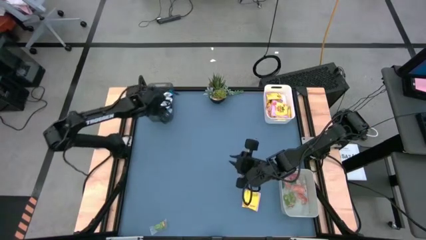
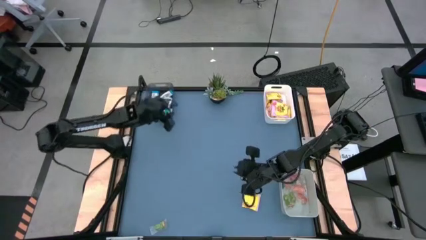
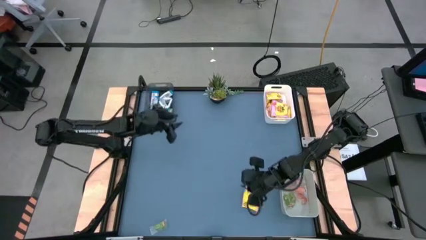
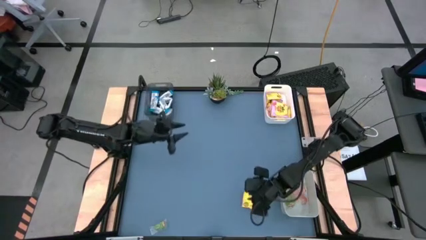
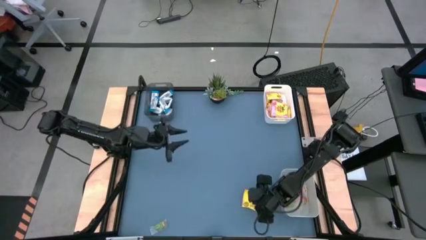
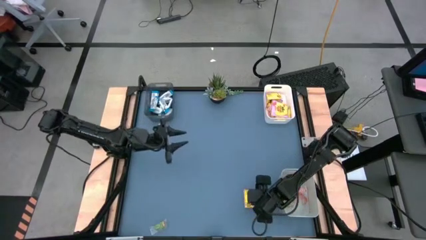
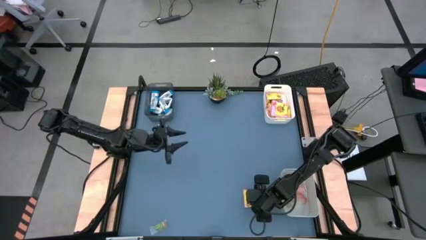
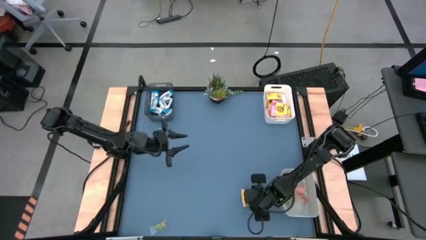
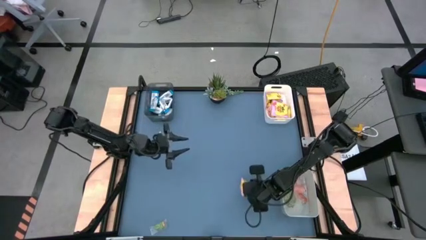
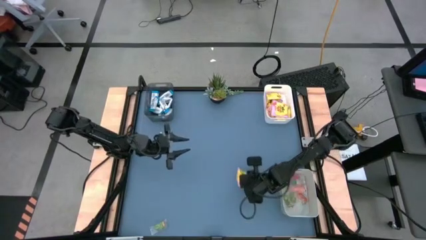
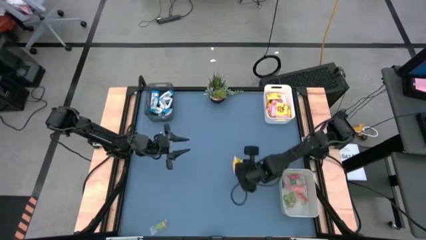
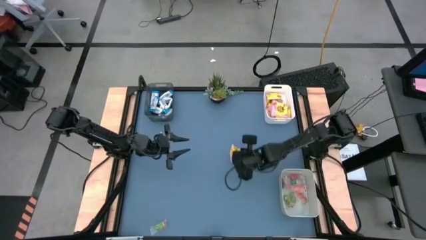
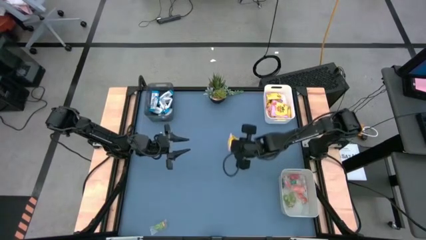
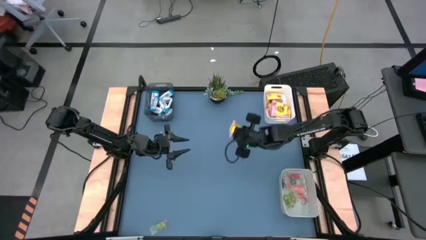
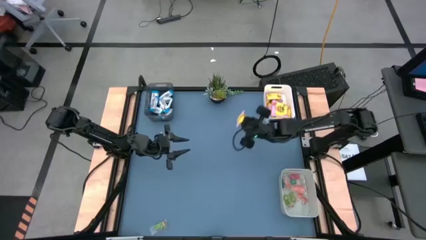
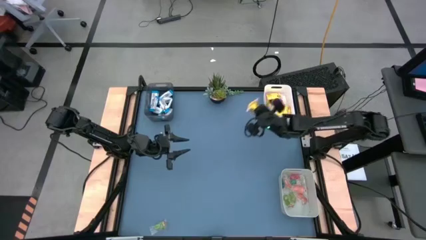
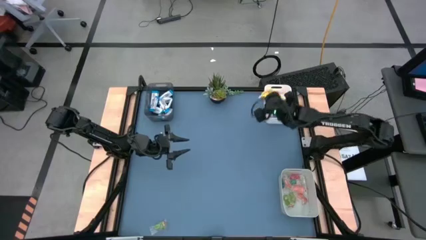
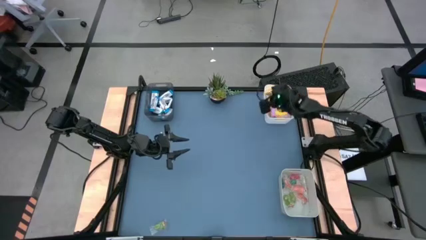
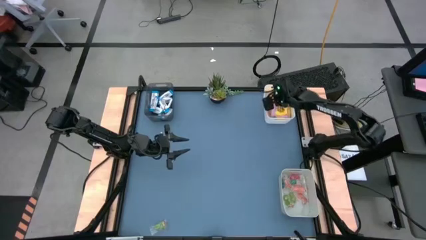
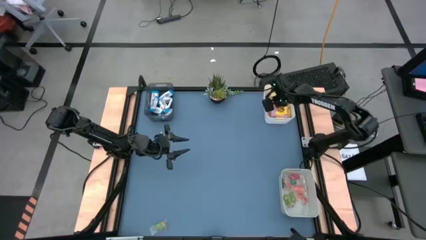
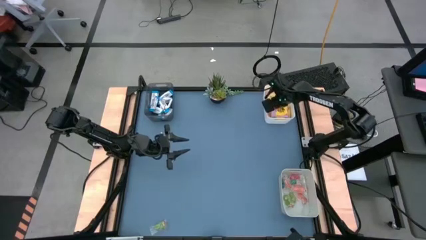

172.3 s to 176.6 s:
Task: Sort candy
Put the yellow candy pack into the white bin

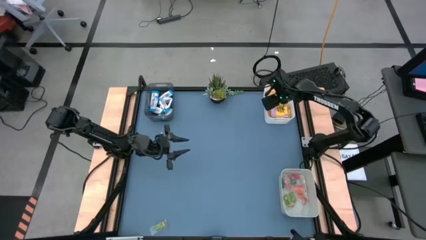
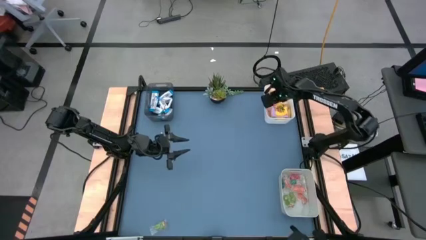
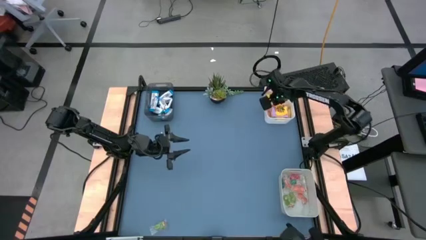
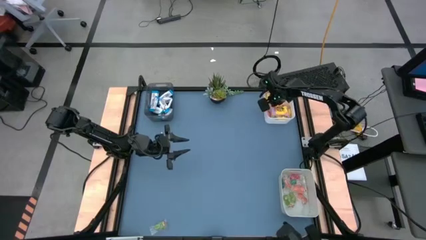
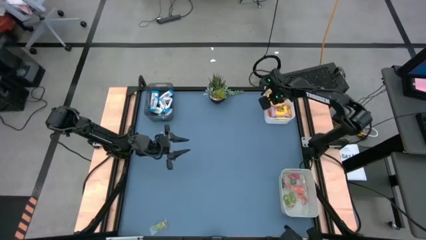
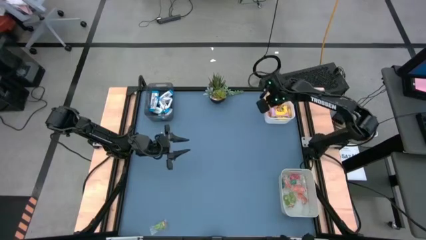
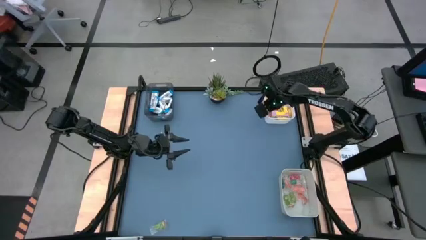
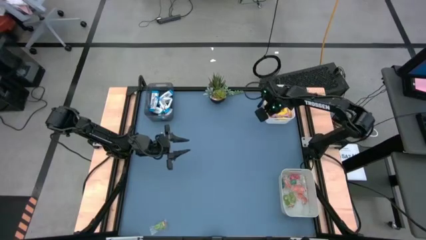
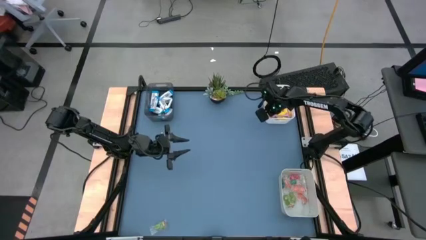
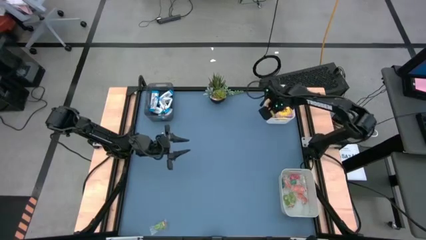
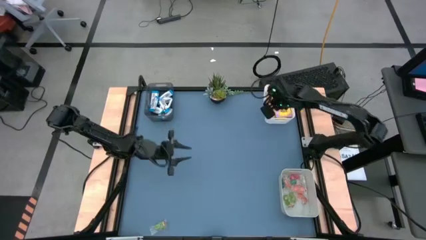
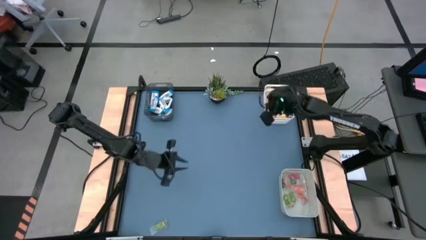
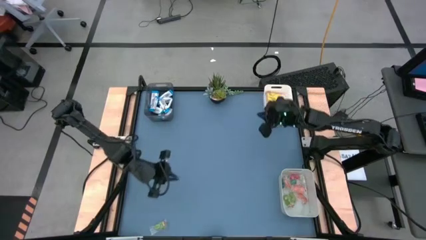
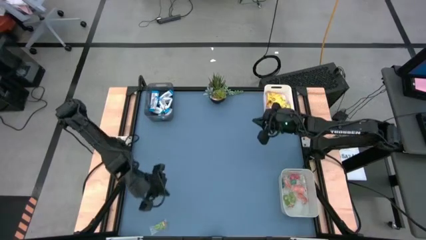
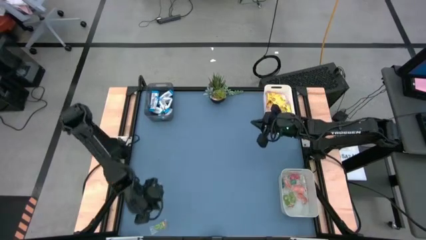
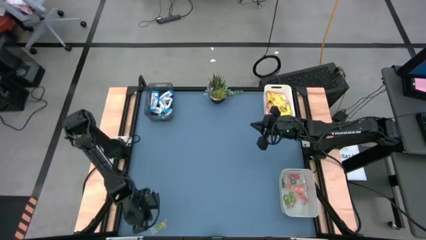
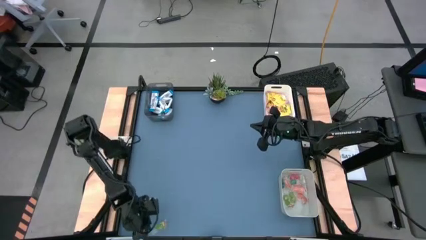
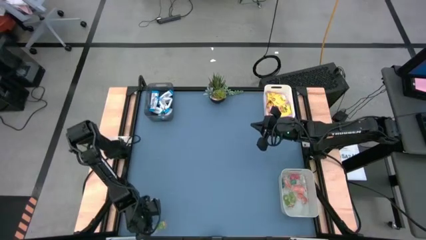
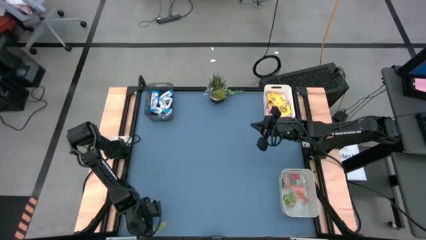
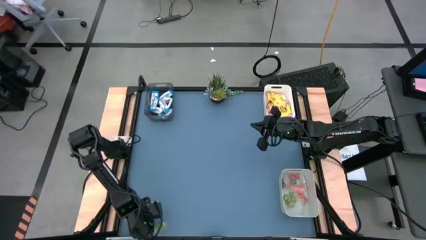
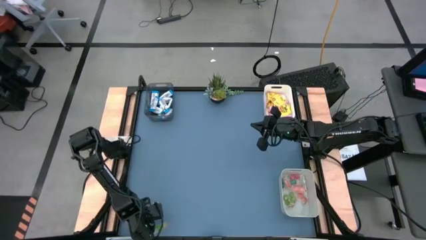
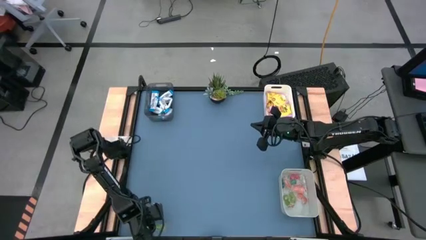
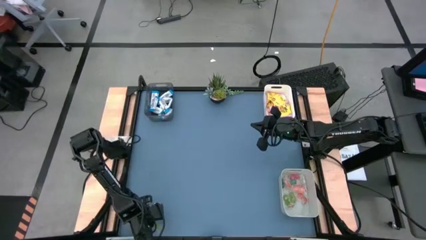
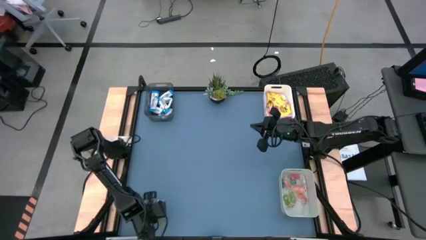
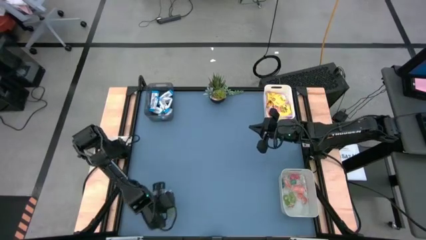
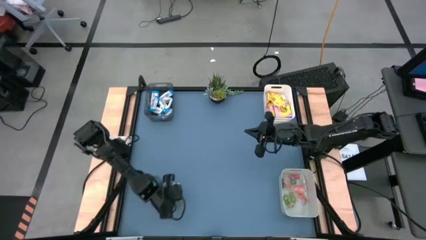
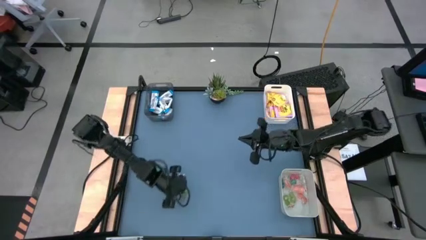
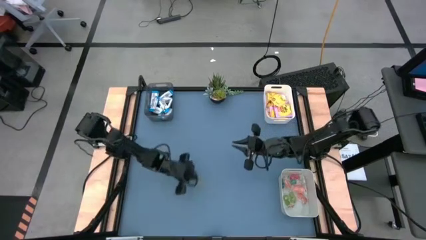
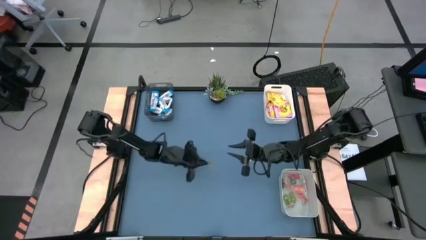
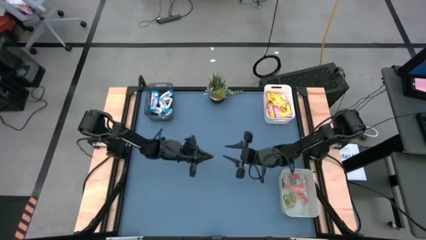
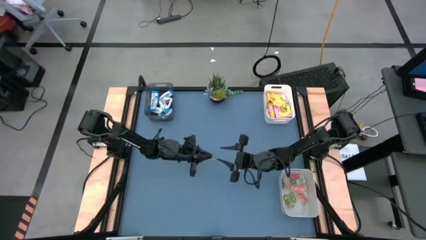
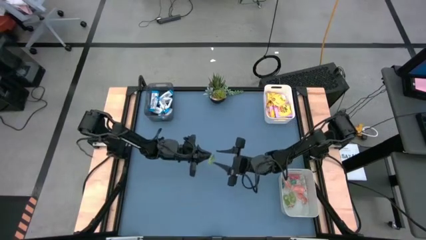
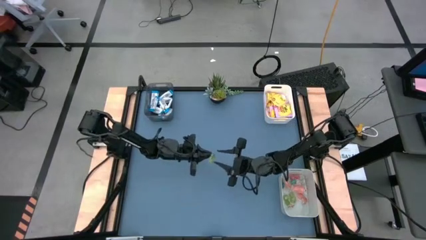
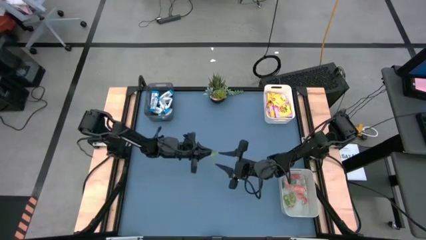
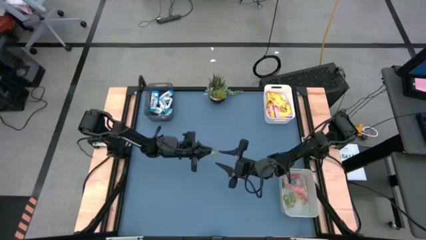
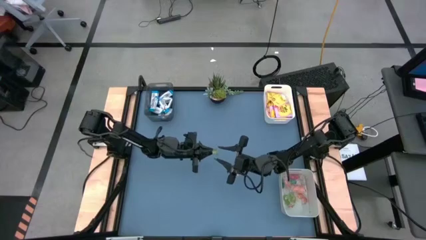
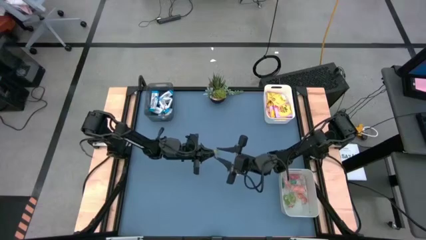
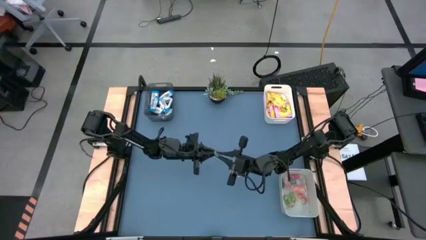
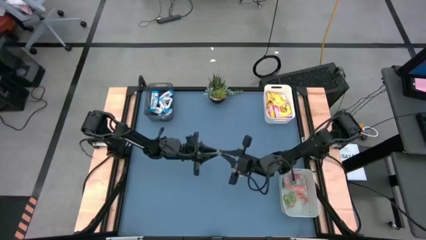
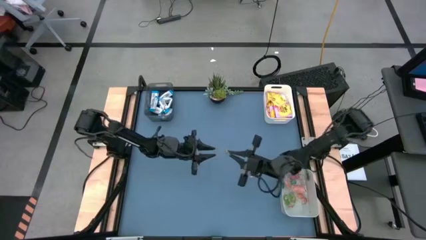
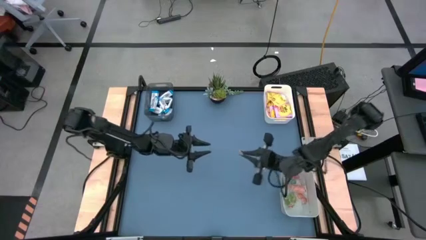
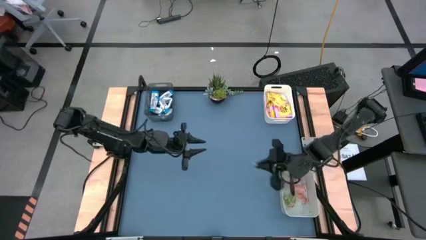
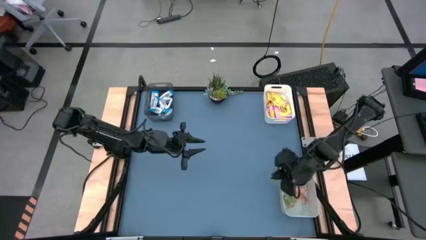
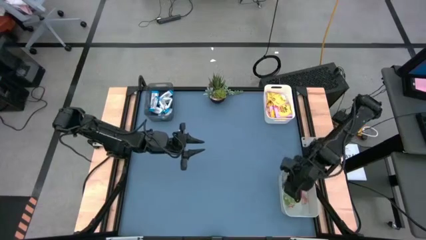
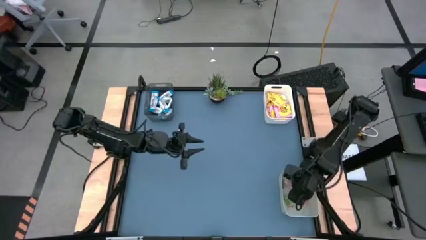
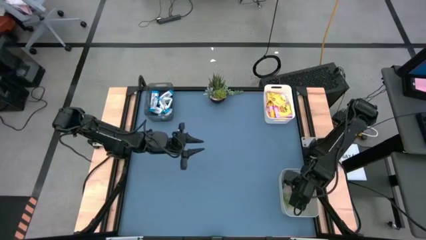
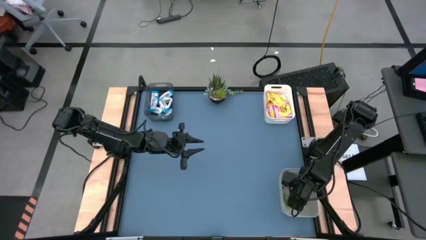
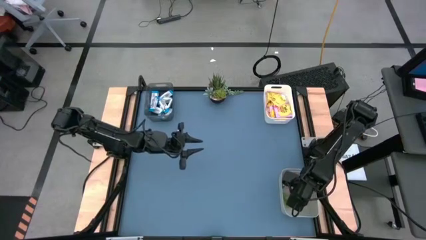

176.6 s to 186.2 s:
Put the light-green gummy candy into the grey bin

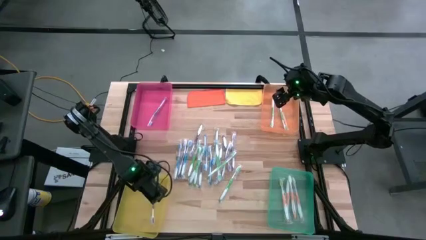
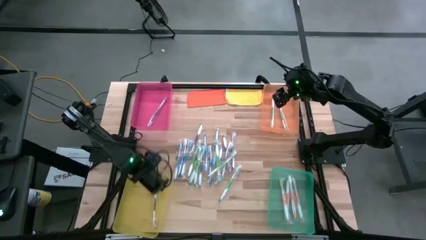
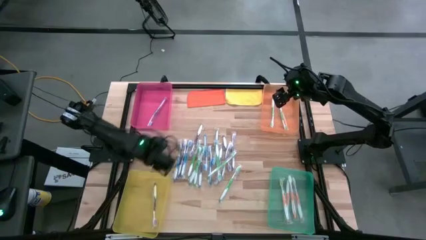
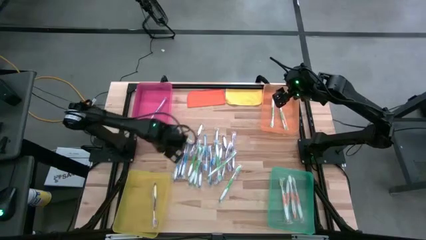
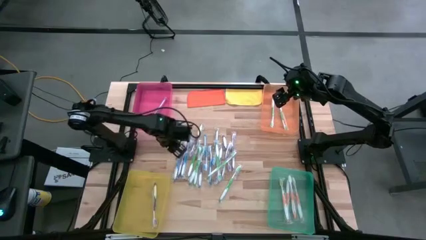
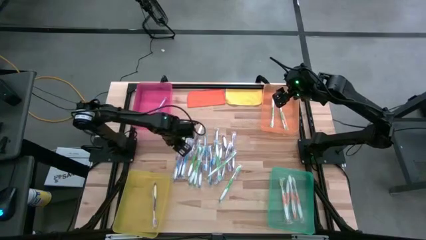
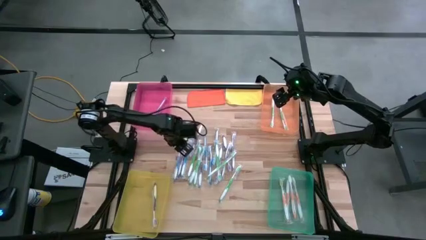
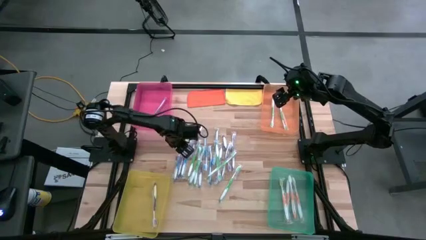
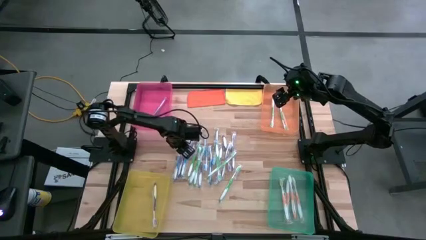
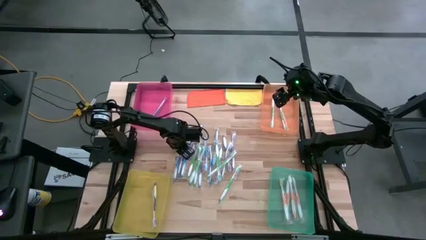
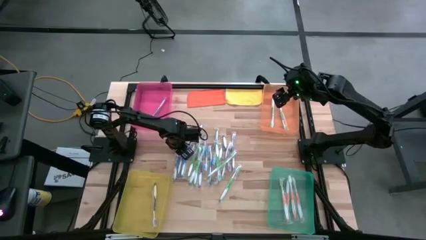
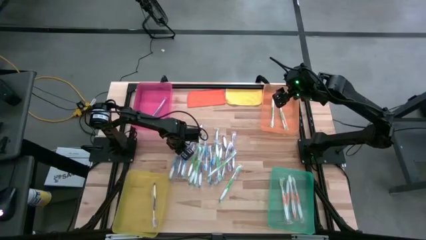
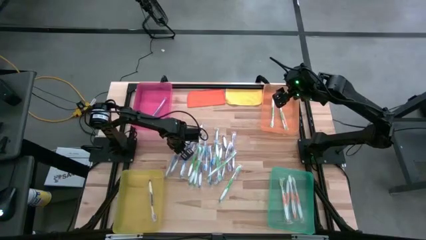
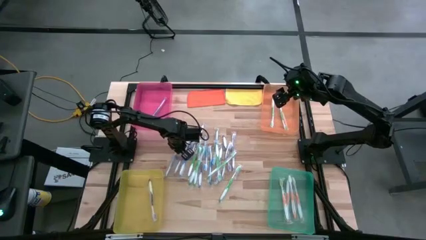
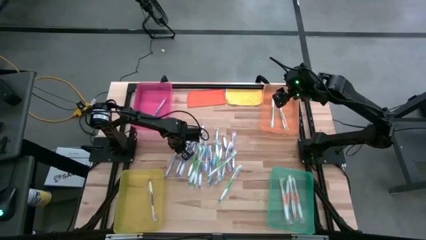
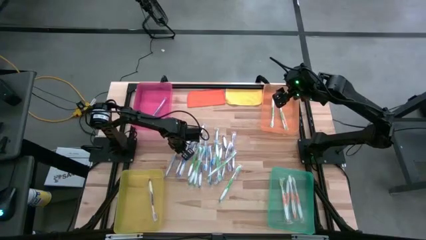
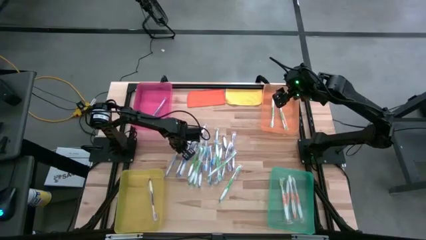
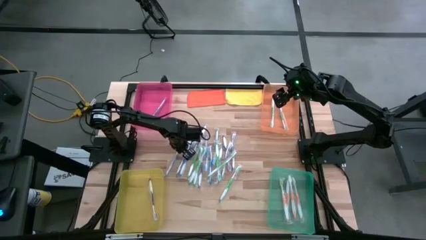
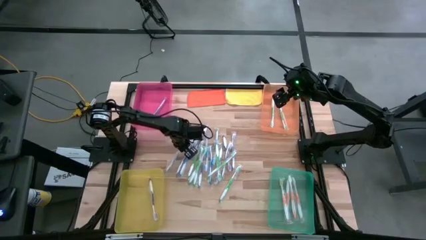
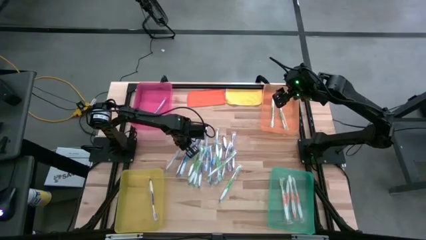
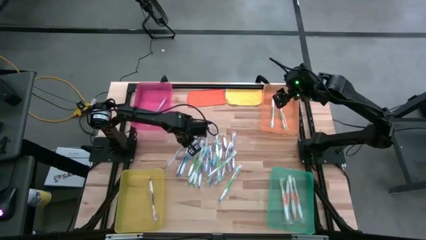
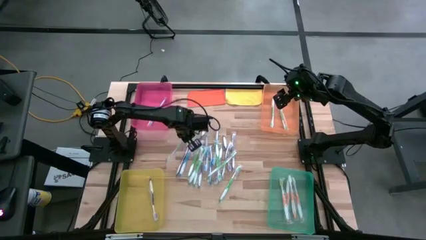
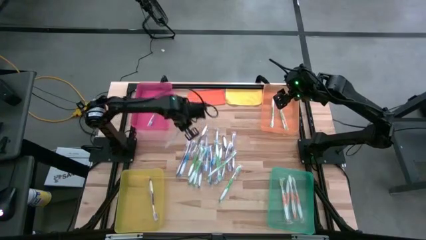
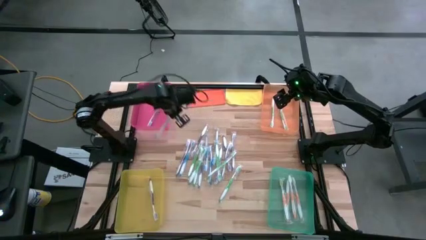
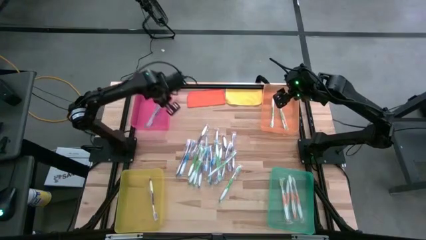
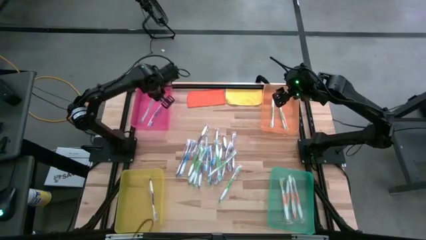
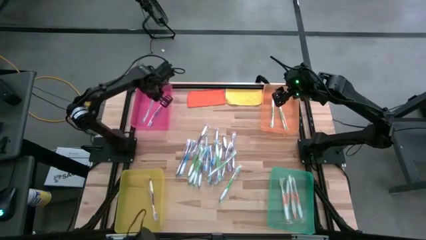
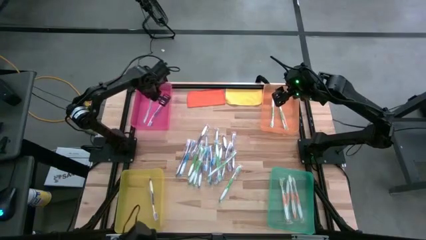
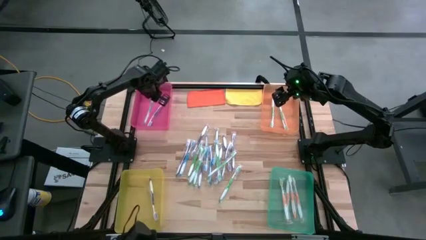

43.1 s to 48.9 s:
Task: Pick & Place Toothbrushes
Put the blue toothbrush into the red bin
